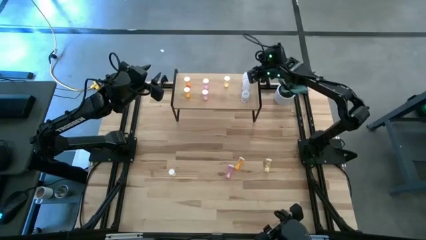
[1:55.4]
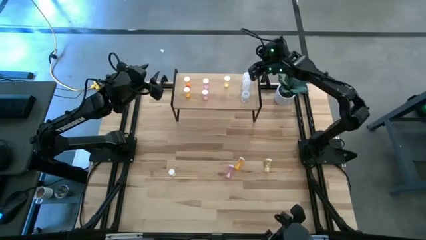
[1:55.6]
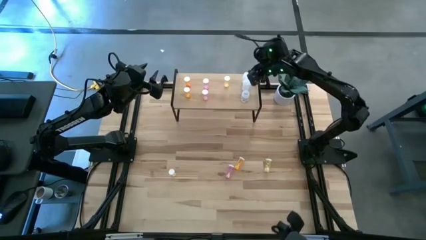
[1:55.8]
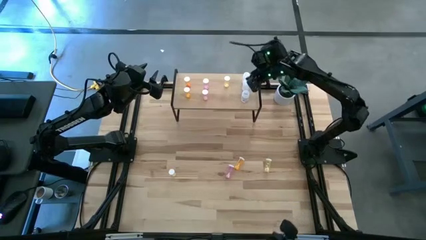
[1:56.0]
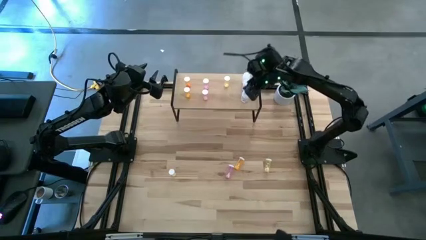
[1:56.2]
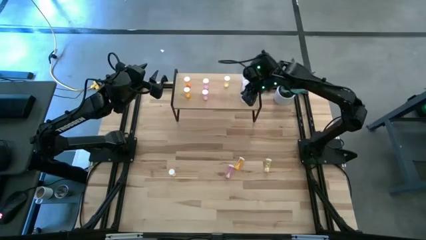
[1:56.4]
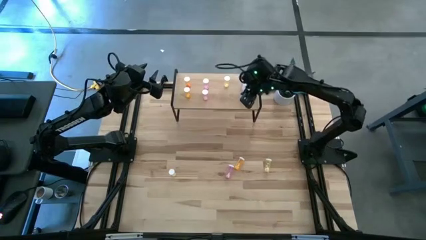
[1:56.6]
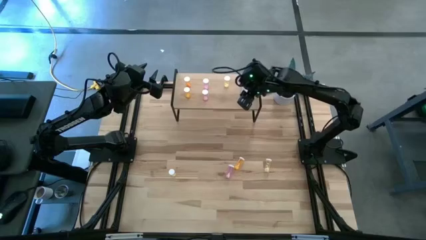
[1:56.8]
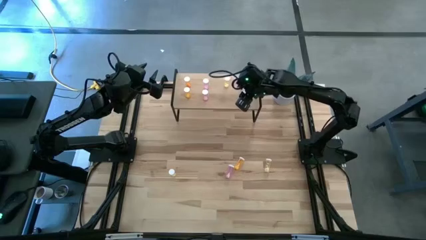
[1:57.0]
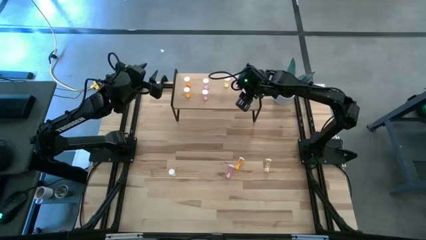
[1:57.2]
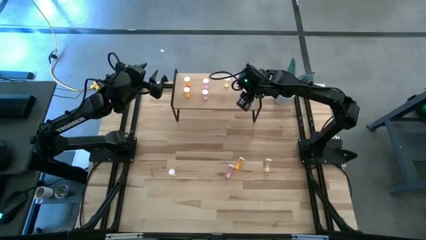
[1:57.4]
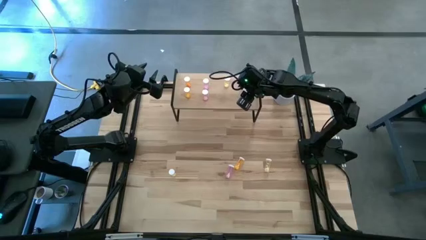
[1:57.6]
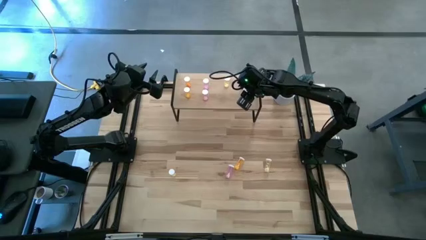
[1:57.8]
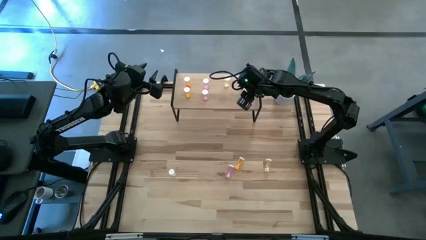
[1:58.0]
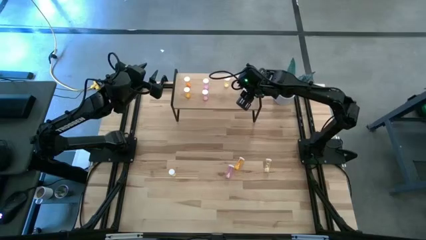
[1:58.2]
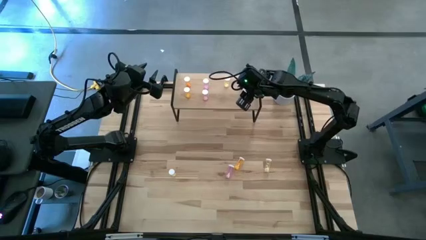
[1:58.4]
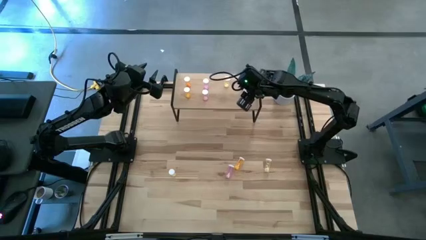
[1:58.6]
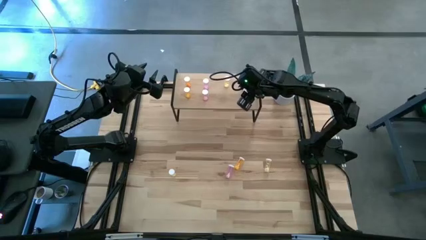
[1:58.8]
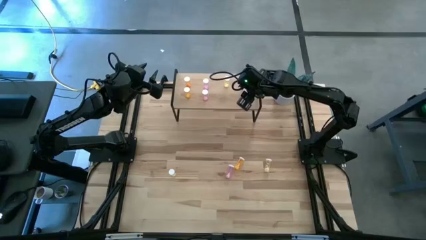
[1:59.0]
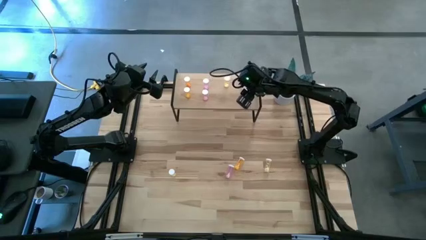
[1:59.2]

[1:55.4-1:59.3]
Task: Pick and place medicine bottles onto shelf by color
Adjust the bottom white pill bottle on the shelf

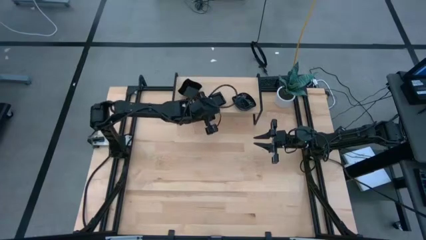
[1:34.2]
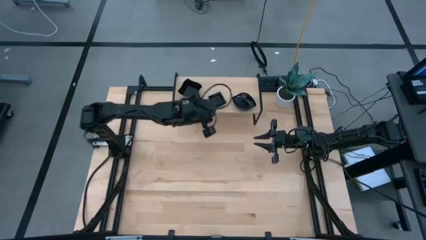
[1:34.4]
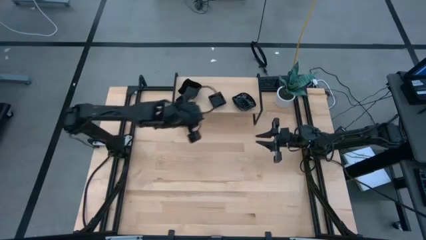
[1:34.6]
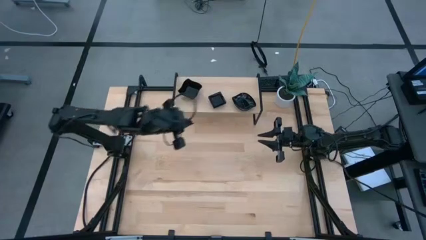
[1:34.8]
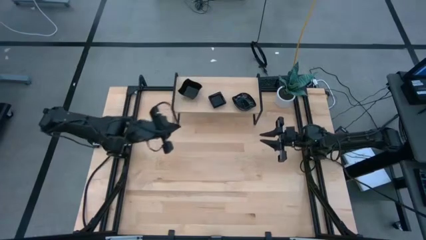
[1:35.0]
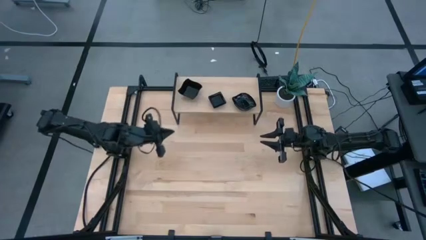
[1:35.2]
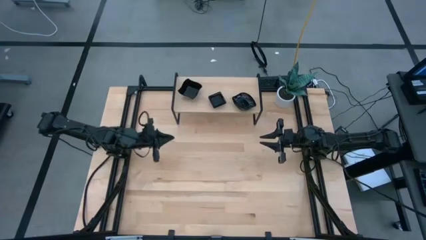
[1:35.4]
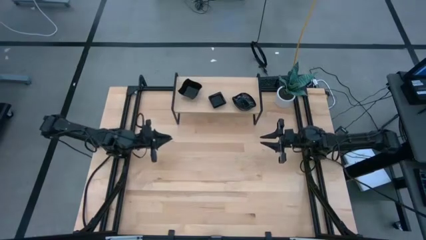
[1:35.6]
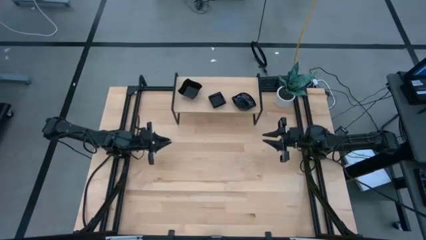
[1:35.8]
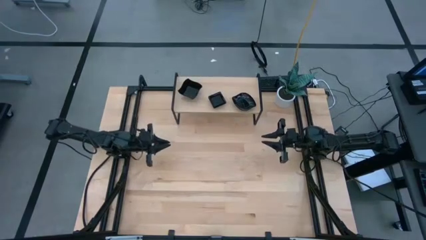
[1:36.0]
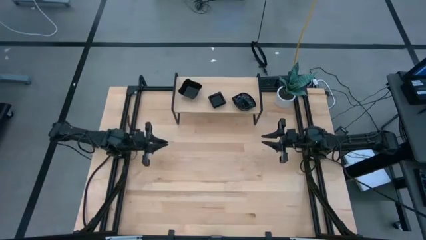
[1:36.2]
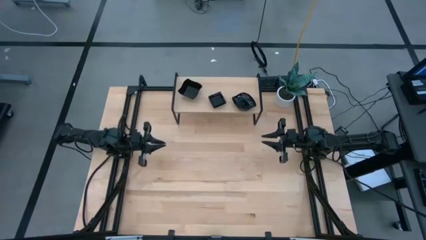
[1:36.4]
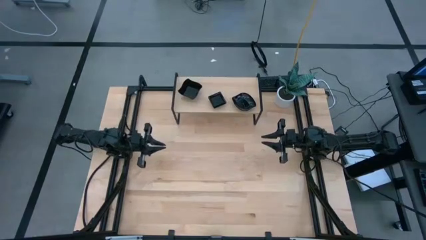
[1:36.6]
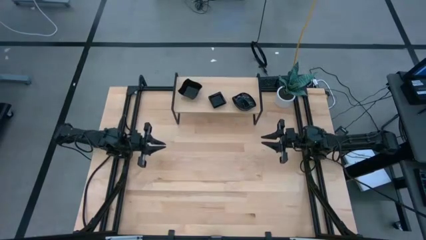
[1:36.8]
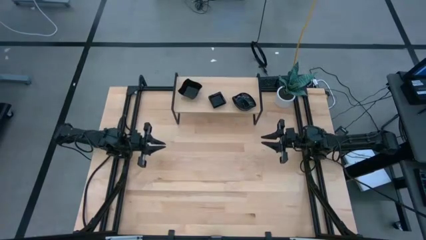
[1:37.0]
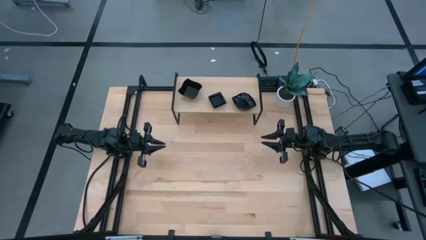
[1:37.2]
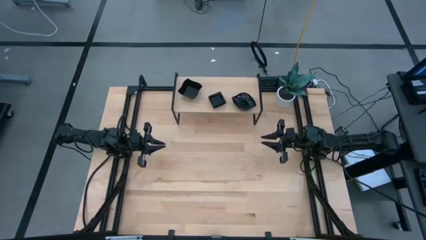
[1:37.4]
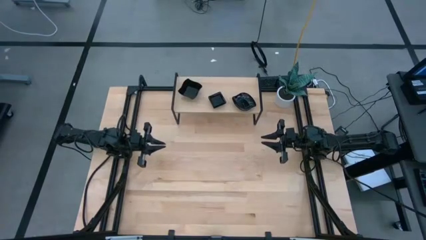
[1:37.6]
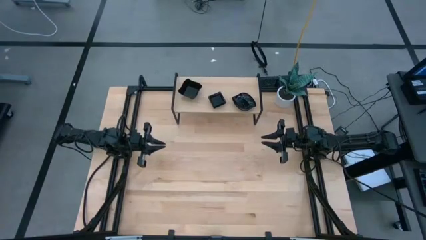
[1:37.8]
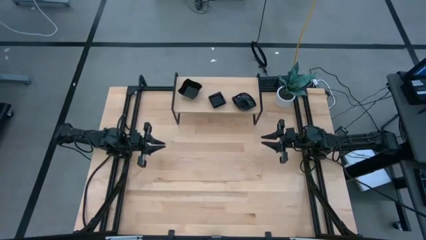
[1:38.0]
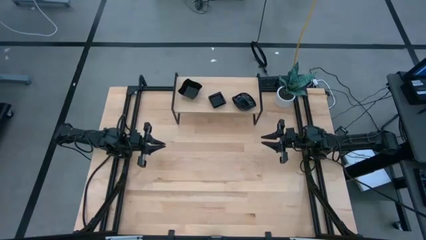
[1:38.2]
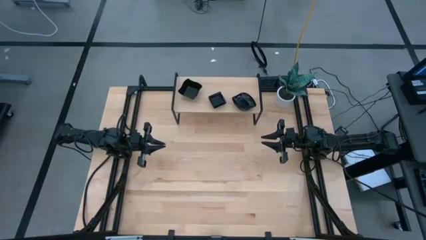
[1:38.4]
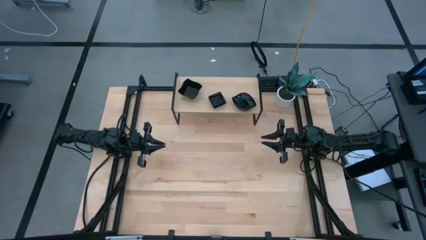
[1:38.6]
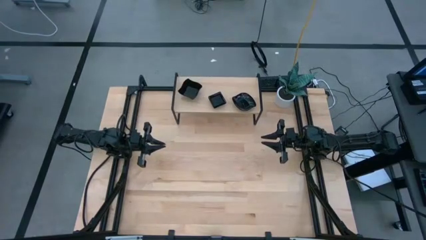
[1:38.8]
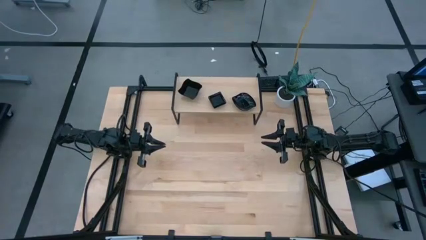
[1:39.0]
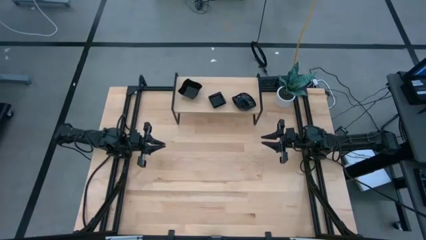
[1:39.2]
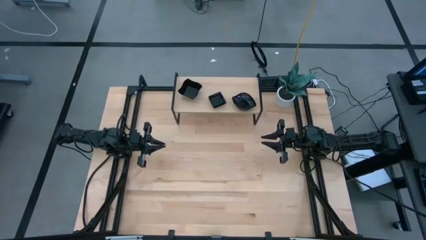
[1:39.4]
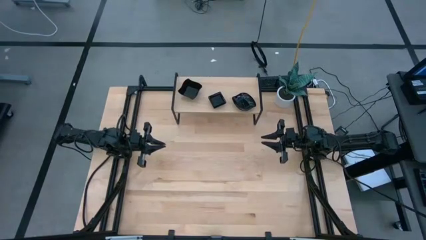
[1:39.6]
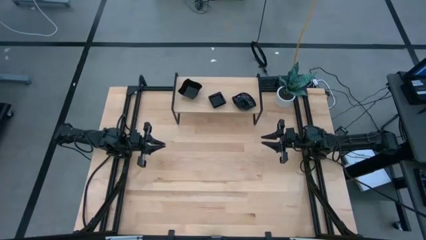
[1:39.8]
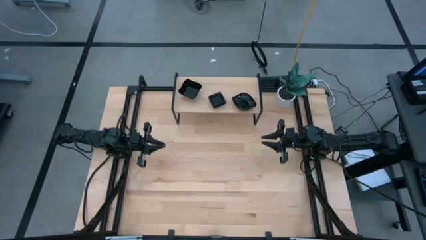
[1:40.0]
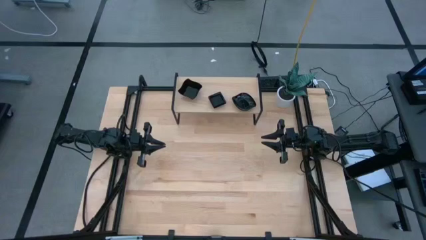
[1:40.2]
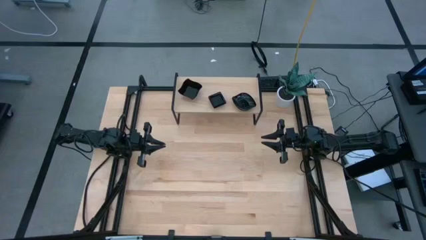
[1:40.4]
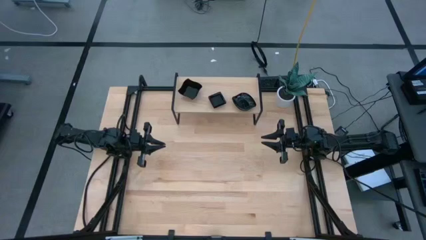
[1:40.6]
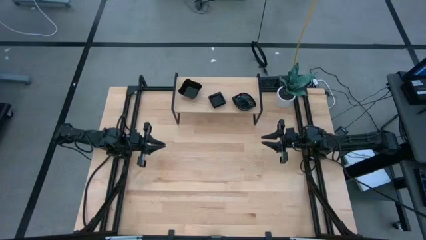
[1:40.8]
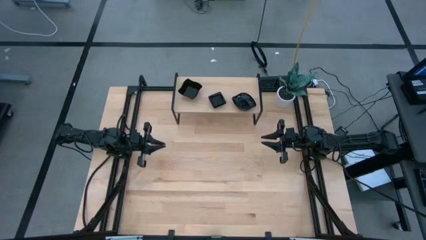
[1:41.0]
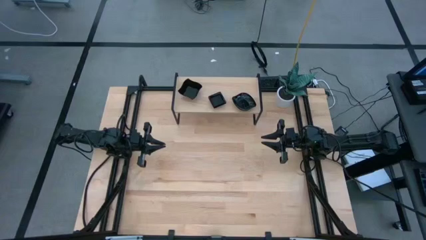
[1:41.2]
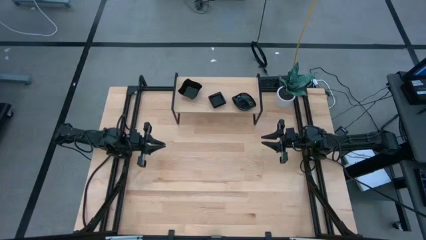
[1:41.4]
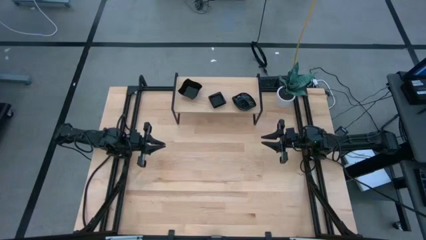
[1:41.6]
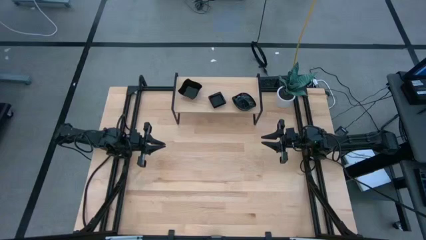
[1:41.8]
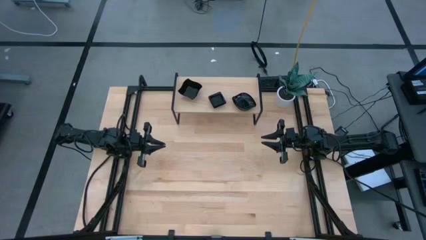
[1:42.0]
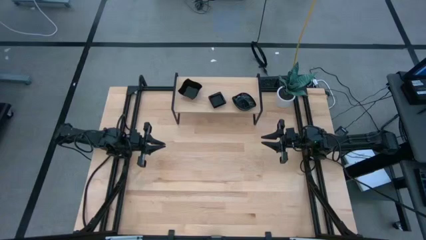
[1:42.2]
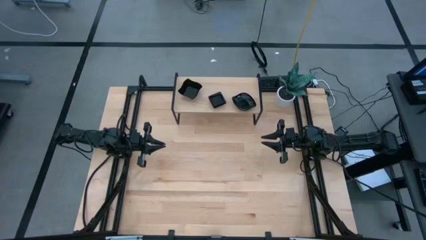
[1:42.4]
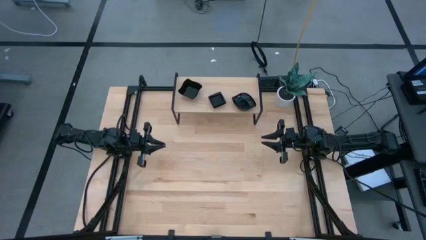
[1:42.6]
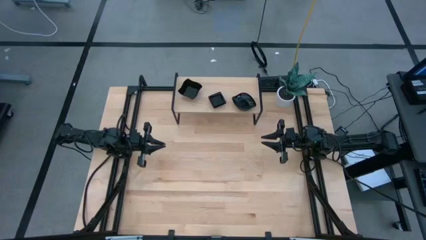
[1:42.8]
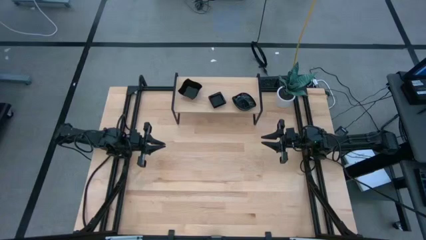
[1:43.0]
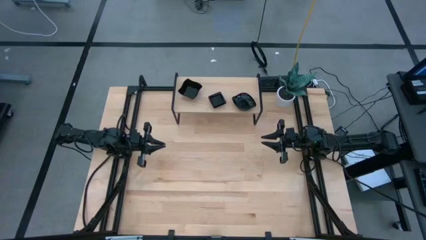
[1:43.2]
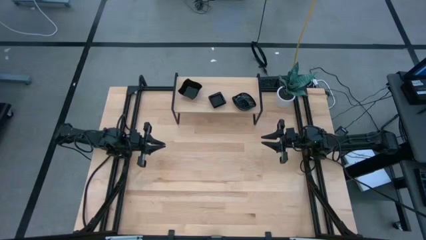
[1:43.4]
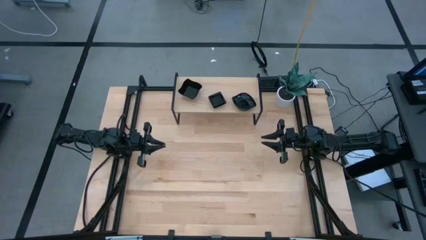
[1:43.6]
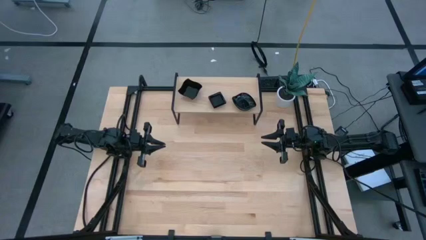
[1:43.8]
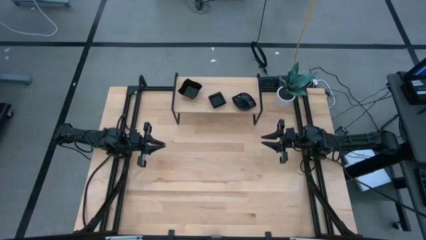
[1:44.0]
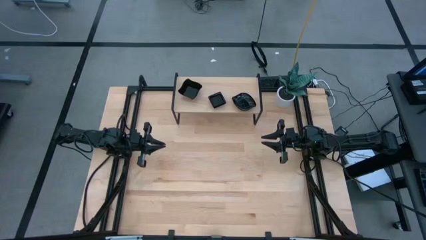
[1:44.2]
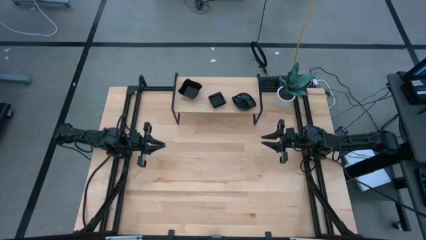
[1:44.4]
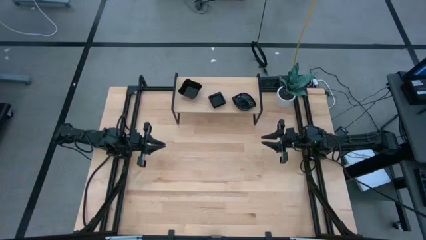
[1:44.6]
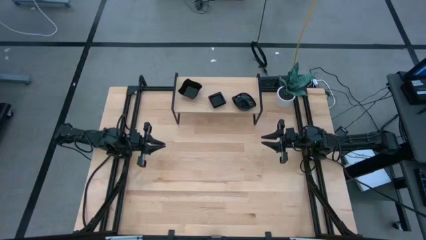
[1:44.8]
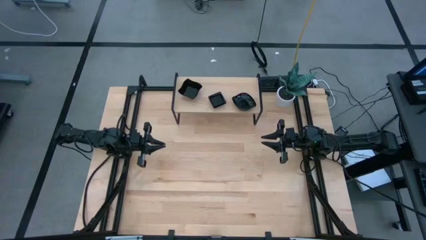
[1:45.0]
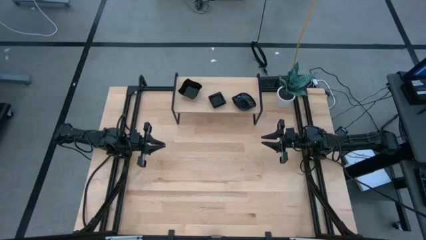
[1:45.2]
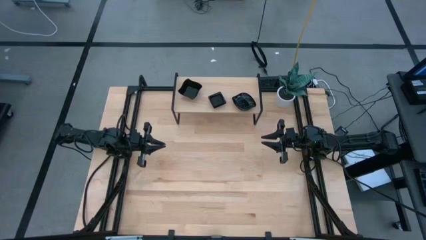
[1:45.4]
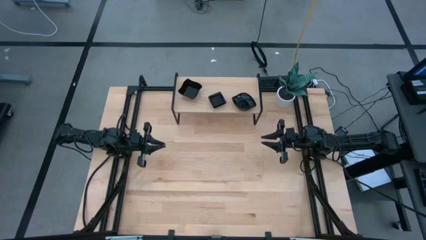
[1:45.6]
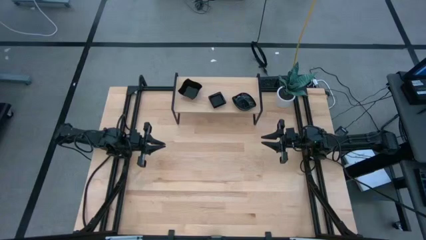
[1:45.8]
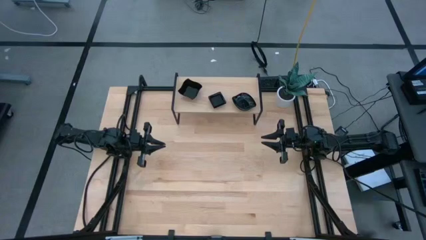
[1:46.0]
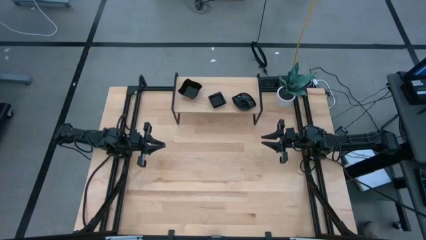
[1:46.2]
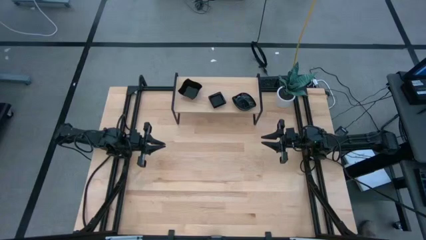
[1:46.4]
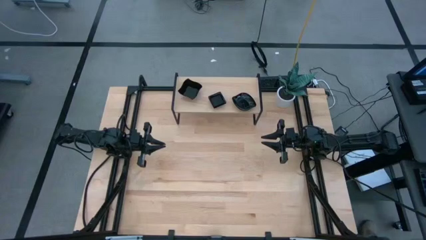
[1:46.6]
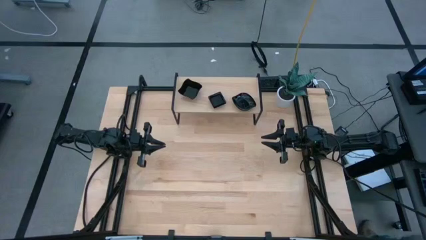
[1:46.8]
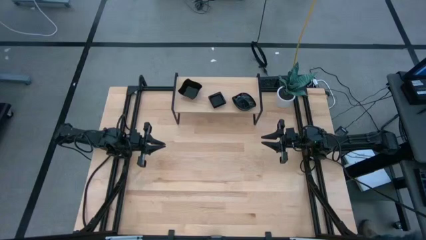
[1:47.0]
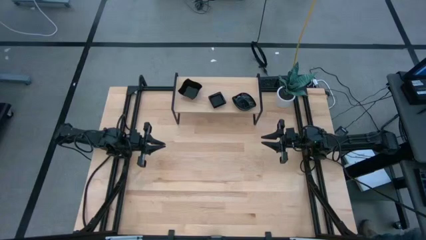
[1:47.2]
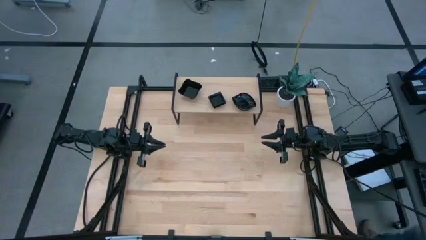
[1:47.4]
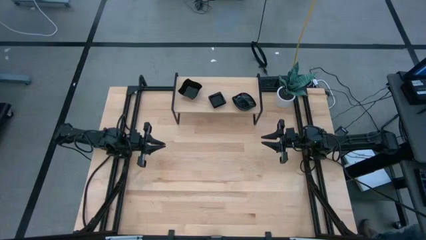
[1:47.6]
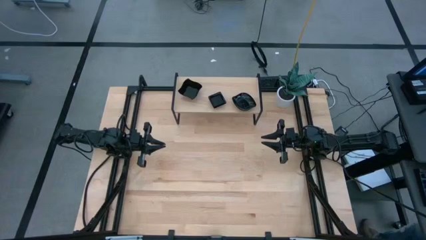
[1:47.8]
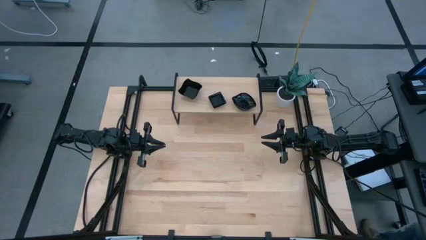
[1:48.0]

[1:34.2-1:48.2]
Task: Pick & Place Mini shaped plates
Return to Home Position
